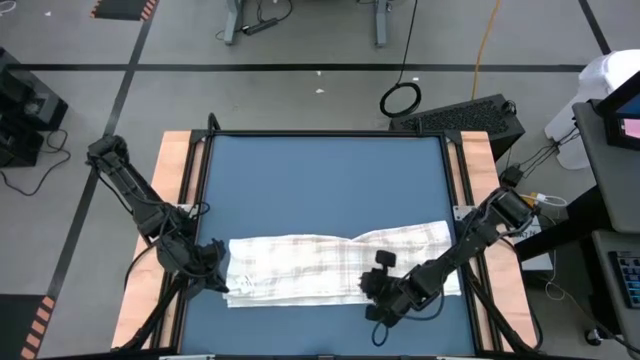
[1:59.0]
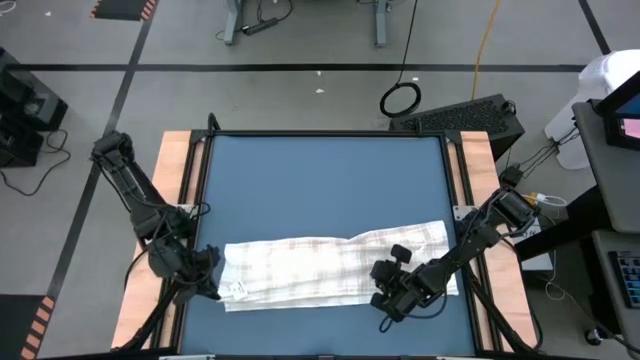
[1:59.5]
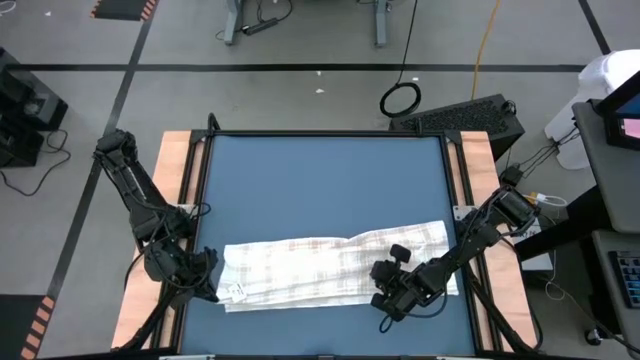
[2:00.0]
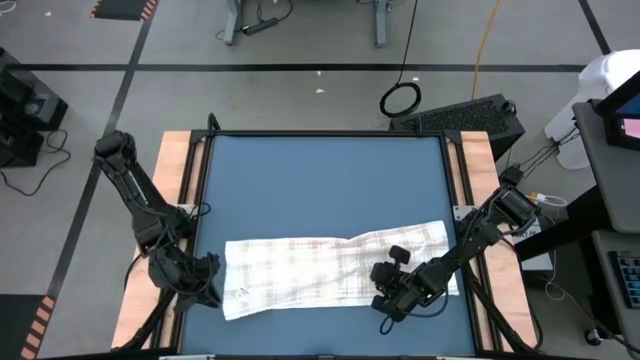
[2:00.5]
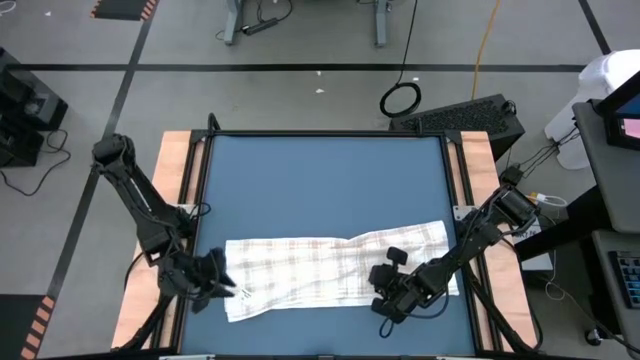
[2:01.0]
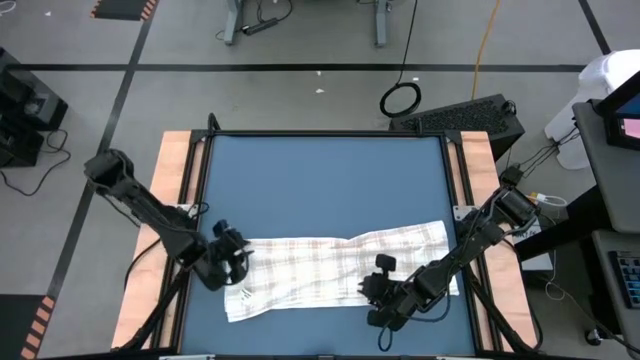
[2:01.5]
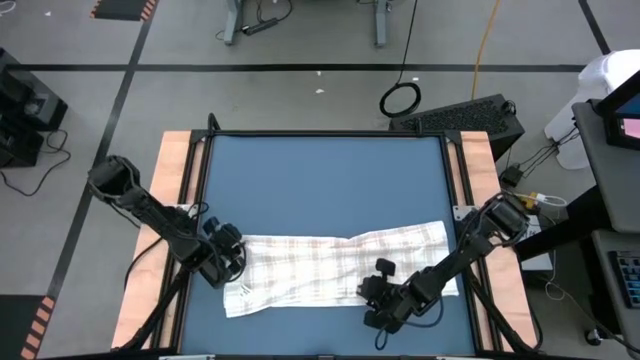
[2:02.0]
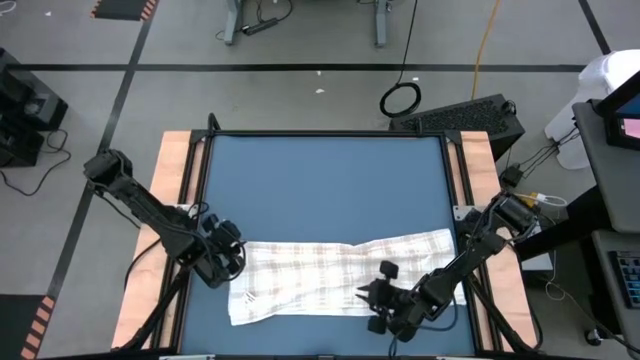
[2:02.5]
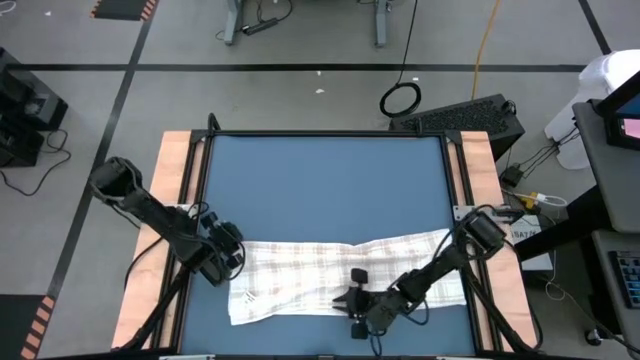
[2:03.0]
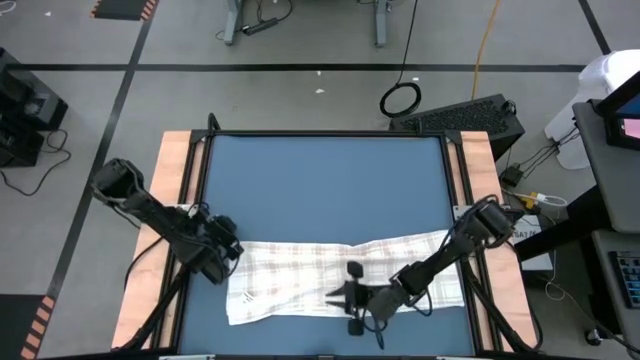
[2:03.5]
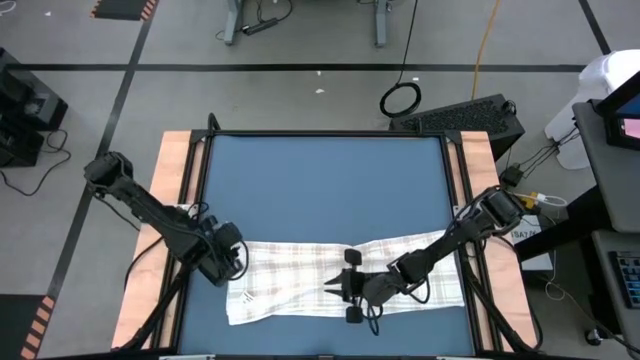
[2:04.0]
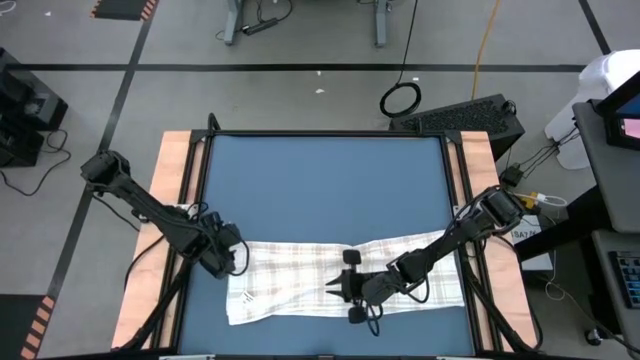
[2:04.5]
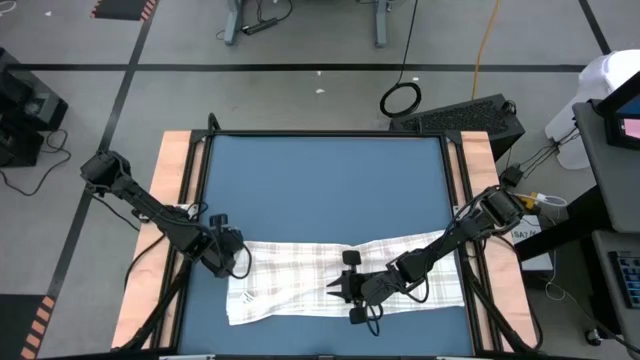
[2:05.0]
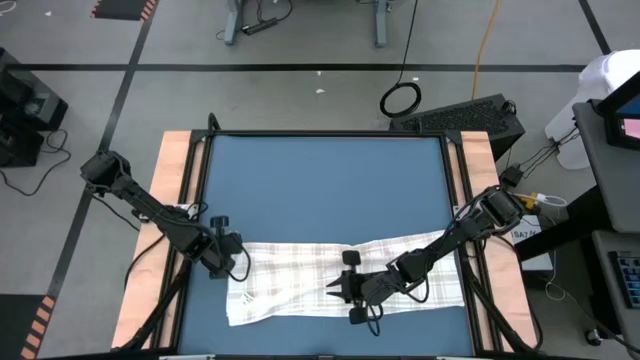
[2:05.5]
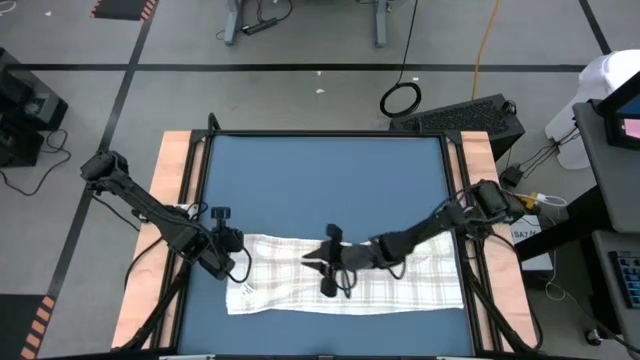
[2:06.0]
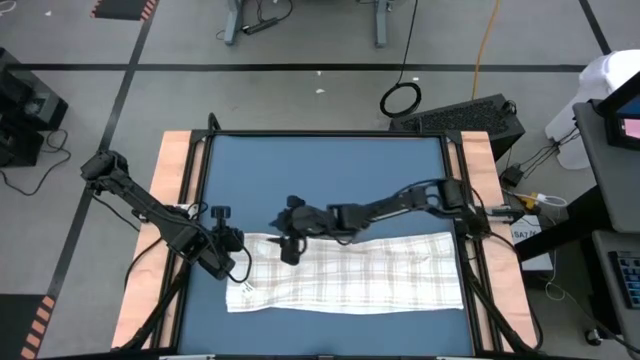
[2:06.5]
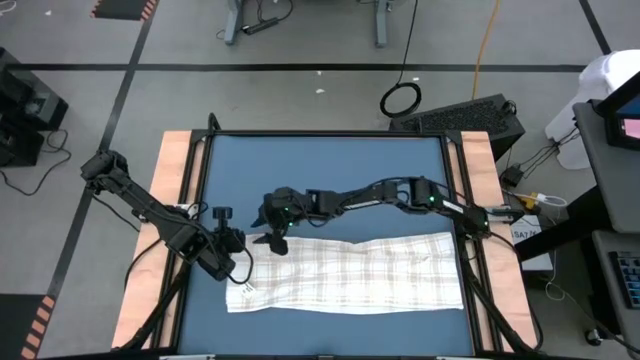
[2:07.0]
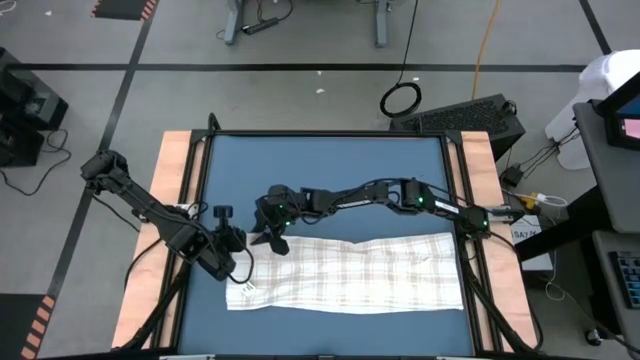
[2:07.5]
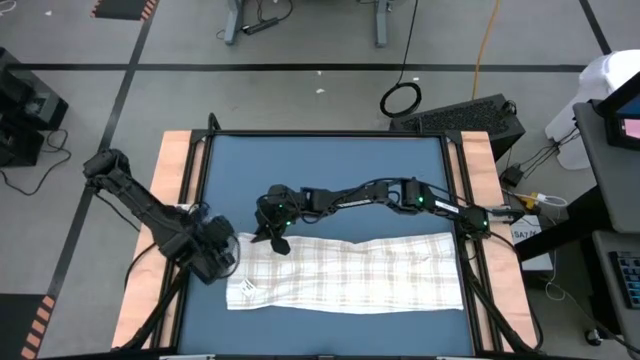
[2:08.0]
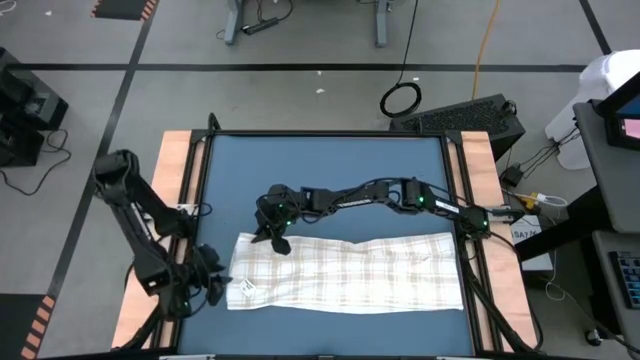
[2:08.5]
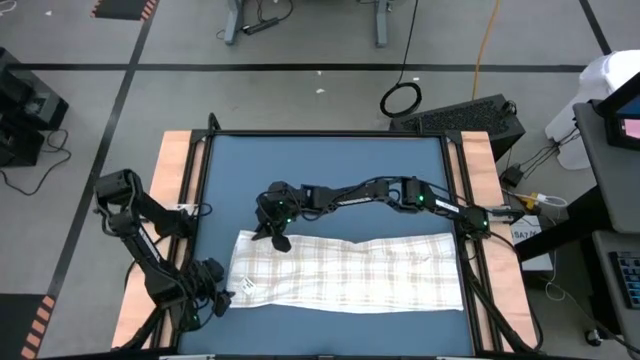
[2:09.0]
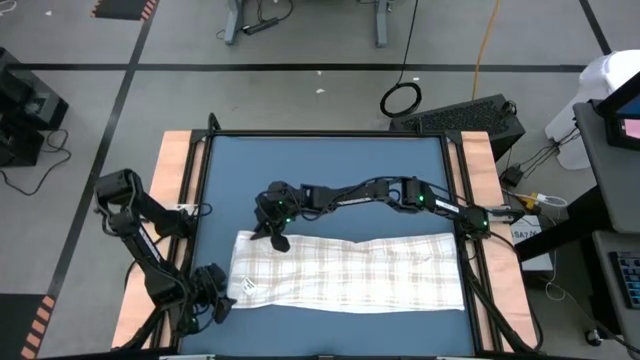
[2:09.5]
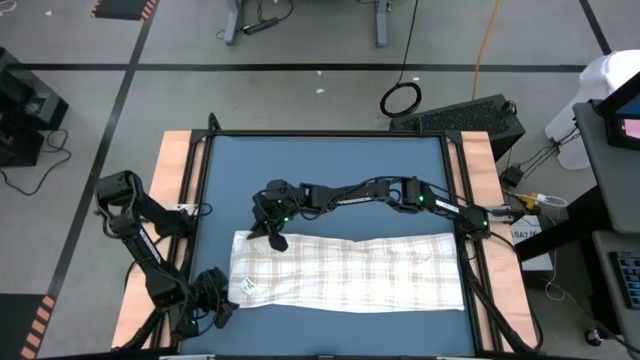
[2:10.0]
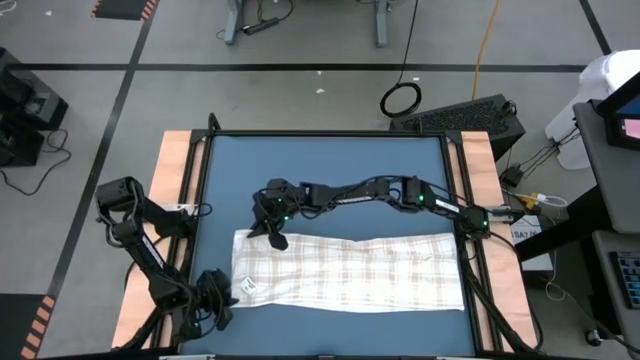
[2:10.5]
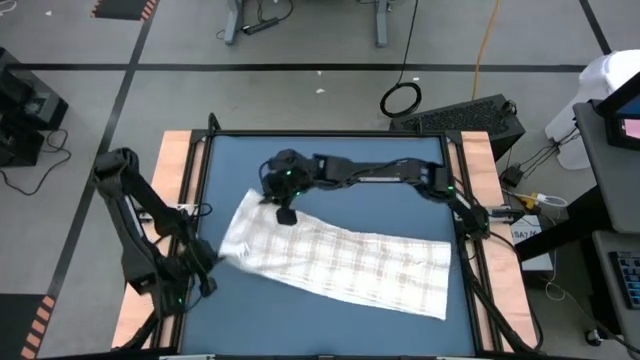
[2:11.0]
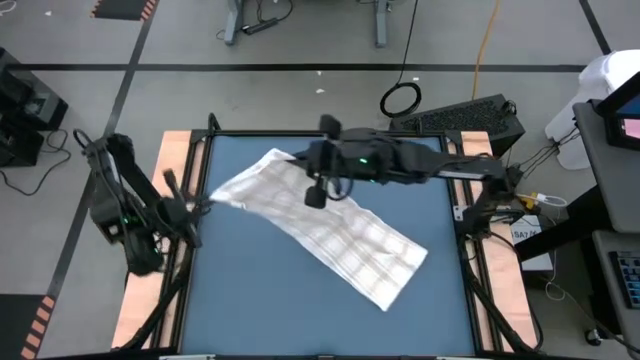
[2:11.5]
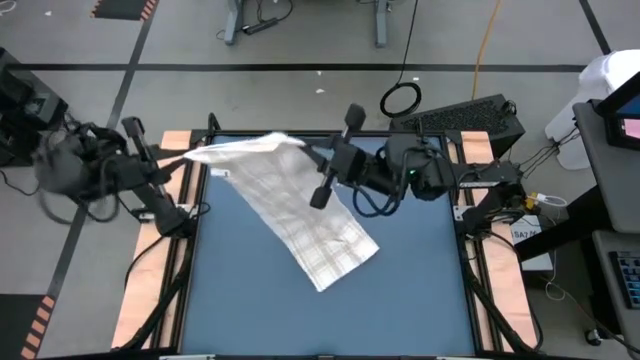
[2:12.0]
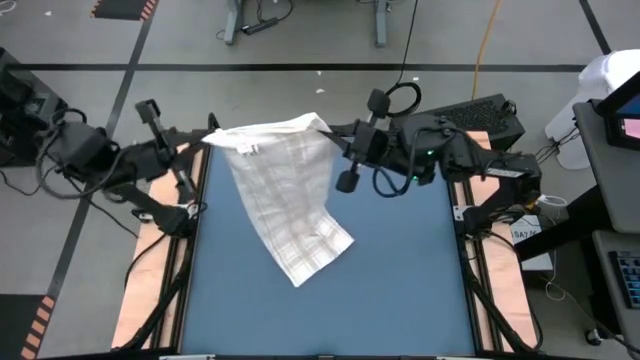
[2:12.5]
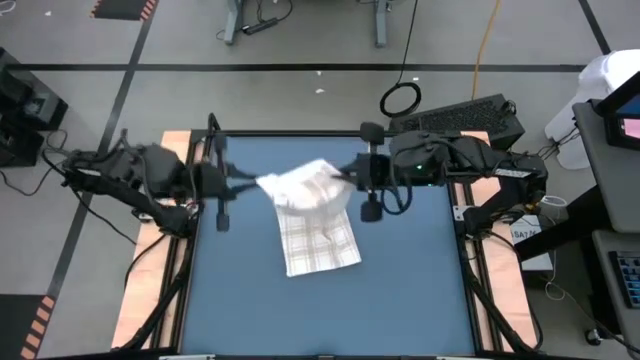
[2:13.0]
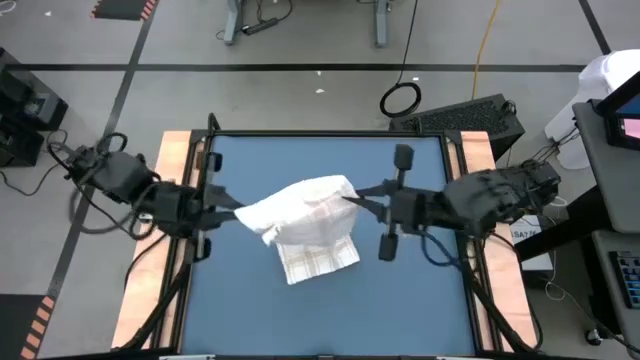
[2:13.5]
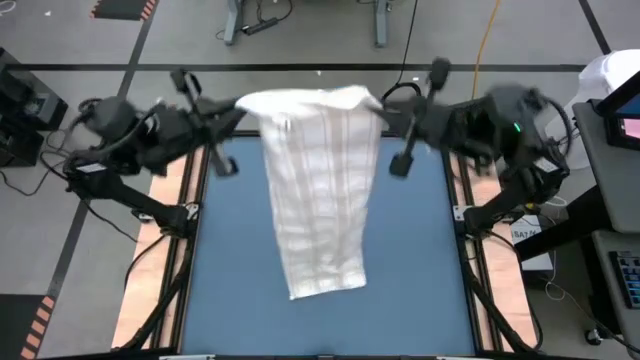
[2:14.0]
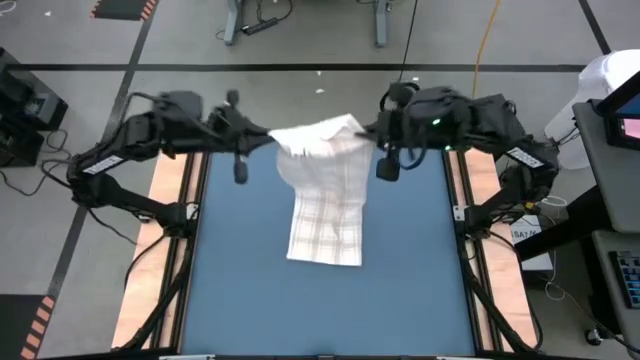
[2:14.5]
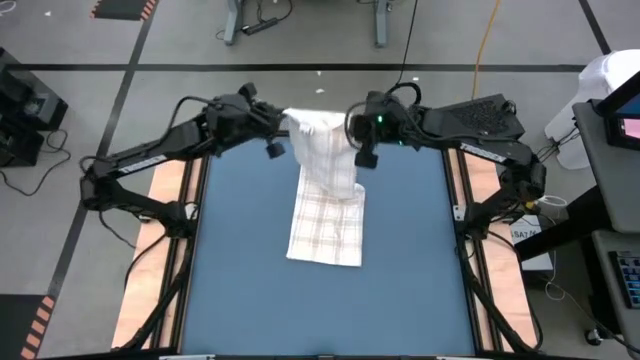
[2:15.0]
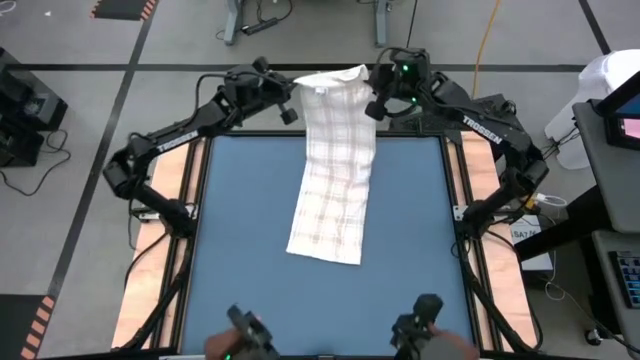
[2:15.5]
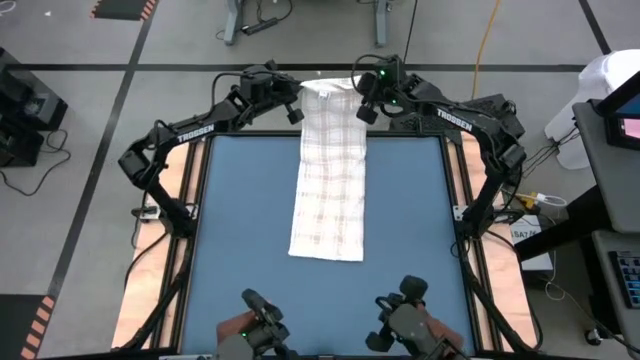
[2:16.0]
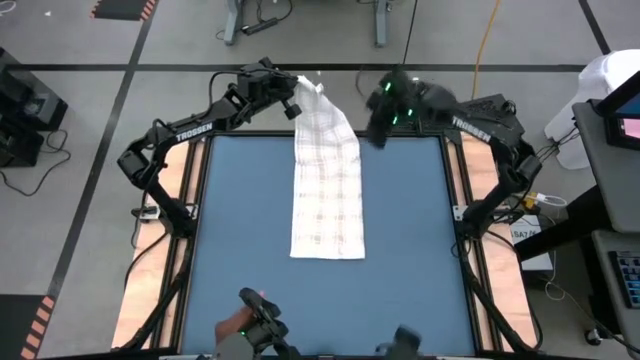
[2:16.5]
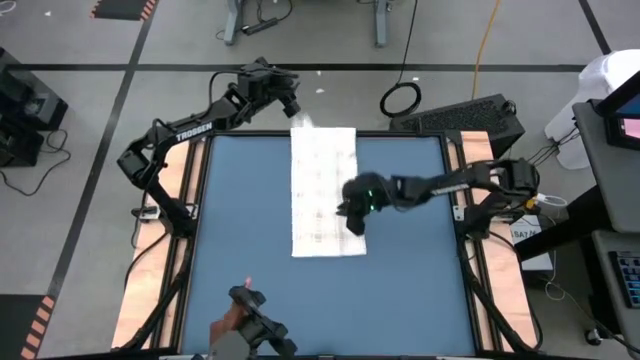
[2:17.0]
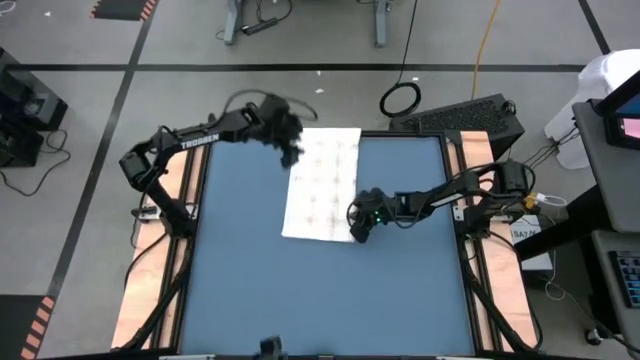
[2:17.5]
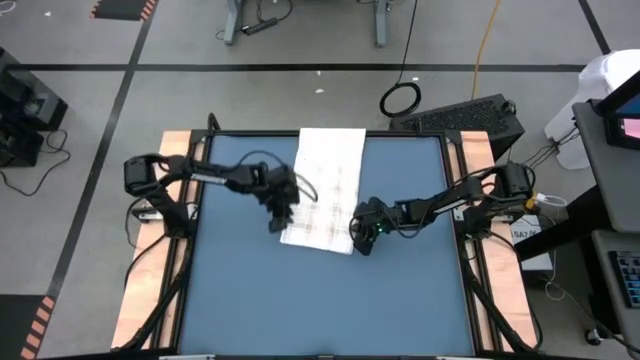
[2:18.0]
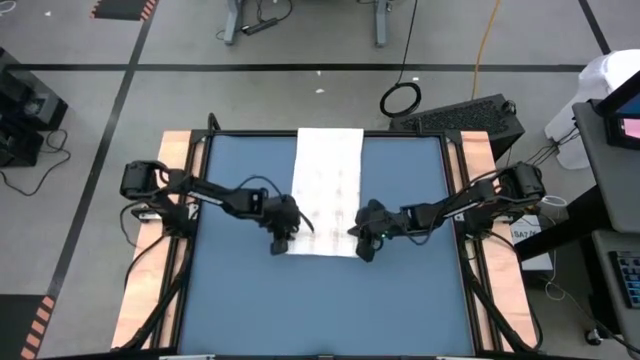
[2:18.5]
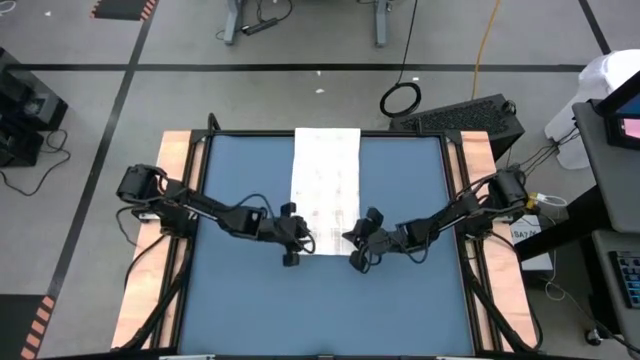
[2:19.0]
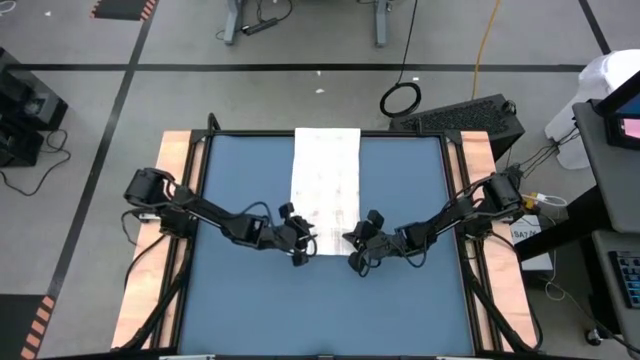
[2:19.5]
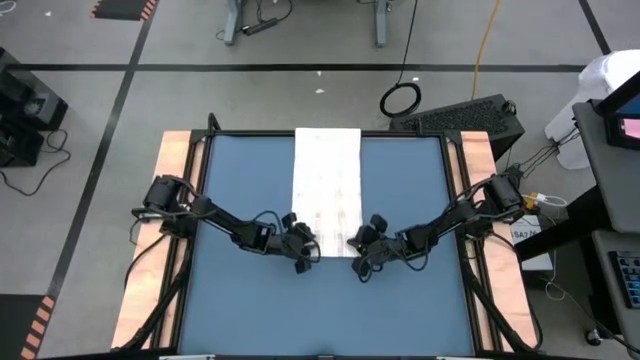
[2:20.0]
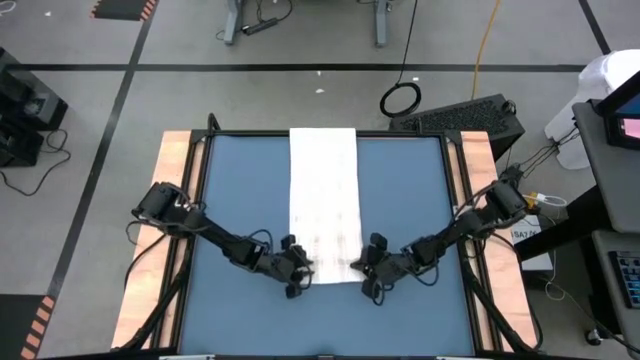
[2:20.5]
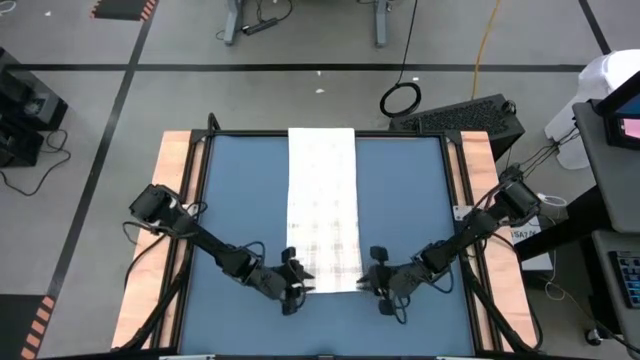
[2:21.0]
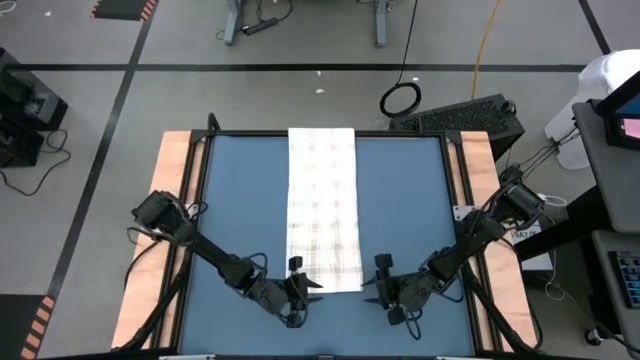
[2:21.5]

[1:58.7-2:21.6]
Task: Roll towel into tight, uniform cylinder
Roll the white towel
